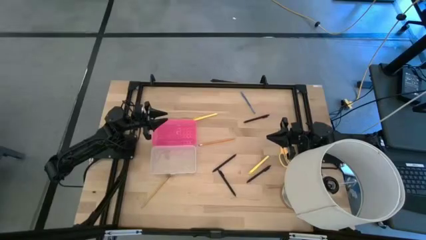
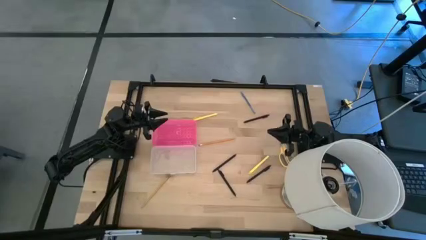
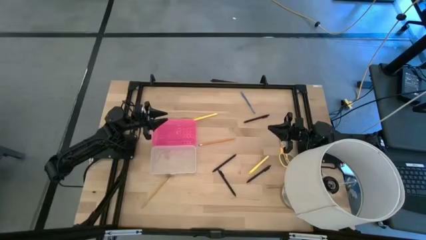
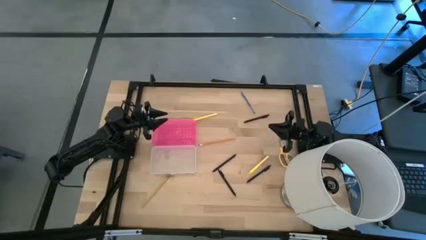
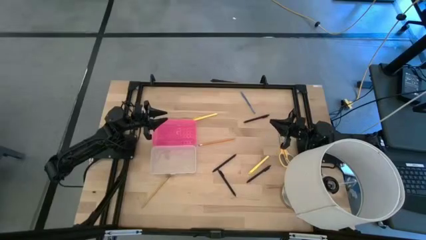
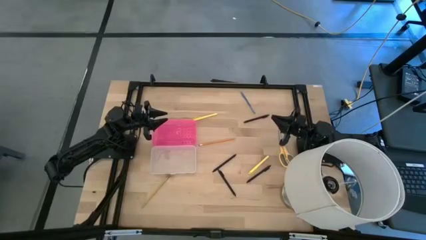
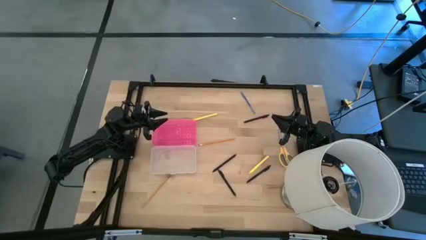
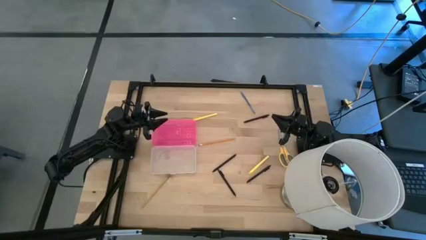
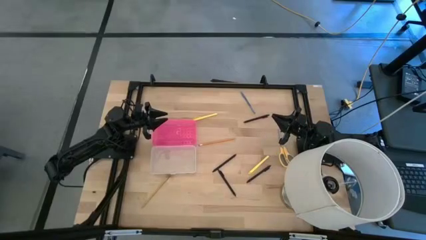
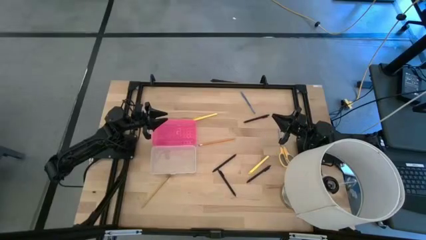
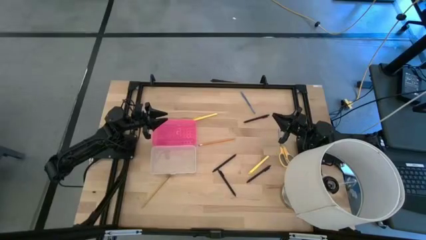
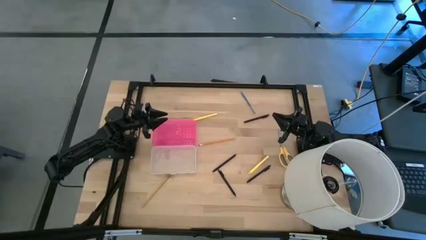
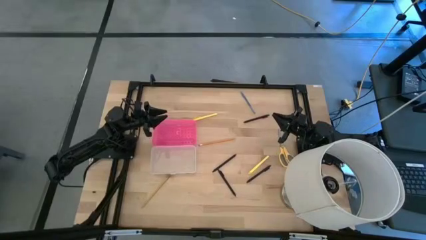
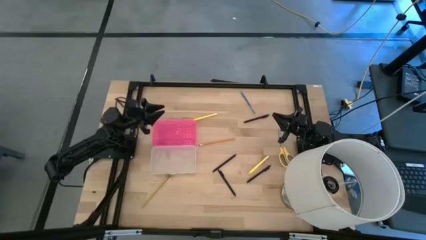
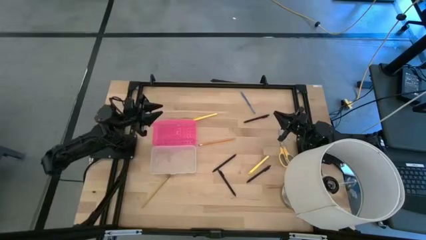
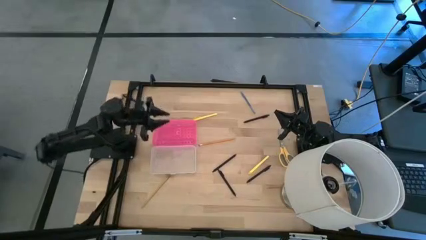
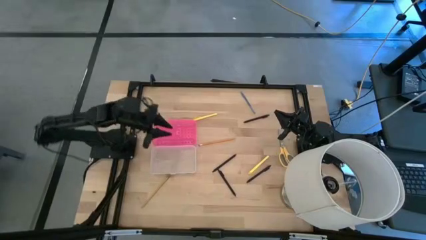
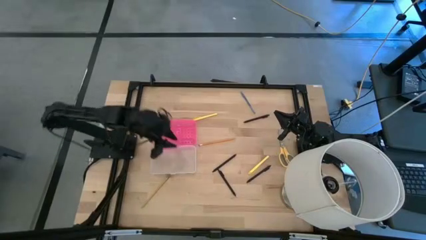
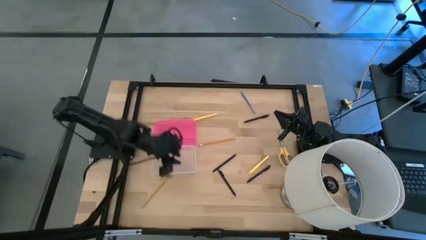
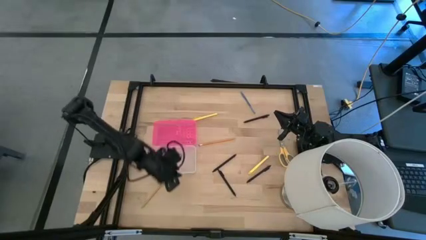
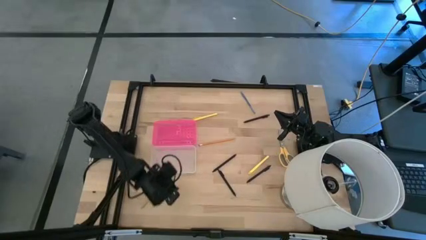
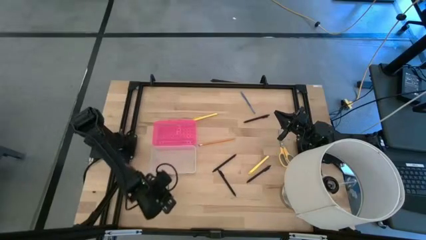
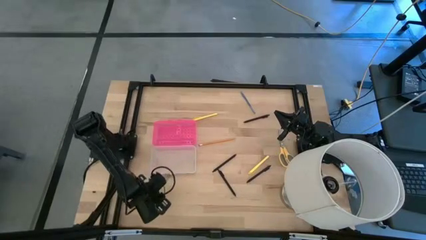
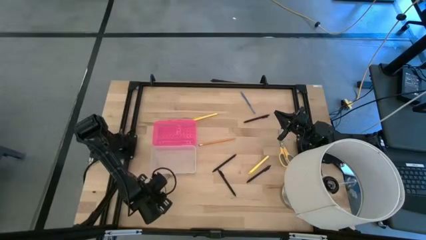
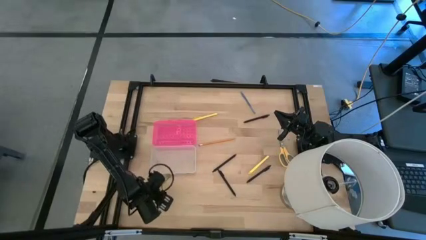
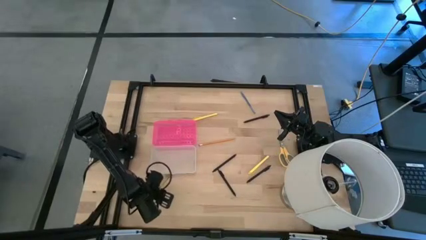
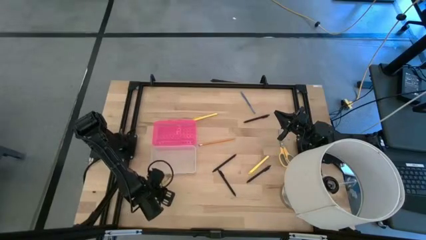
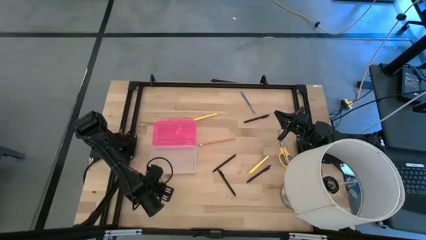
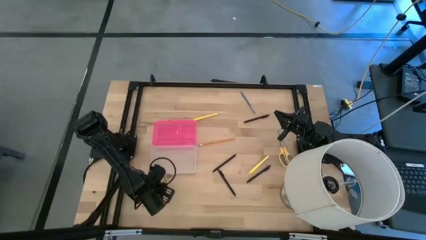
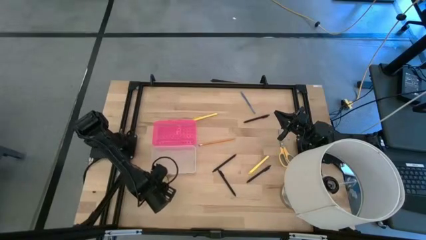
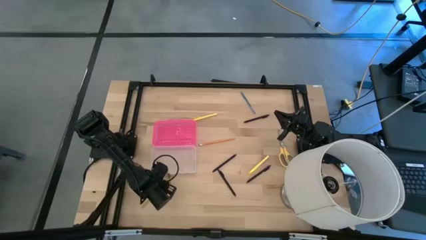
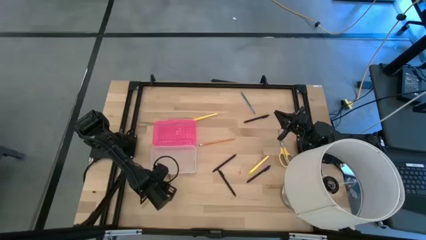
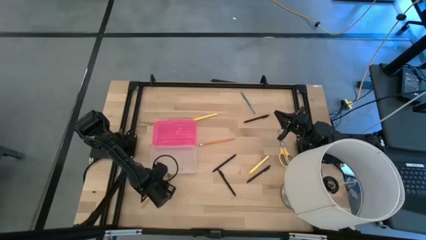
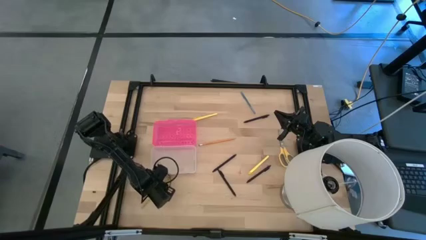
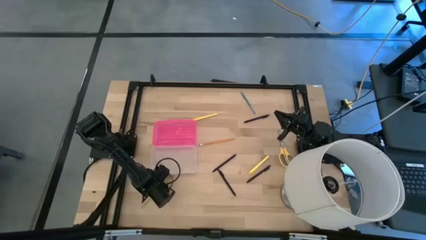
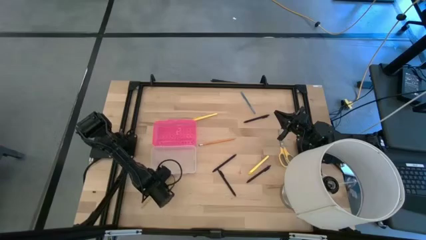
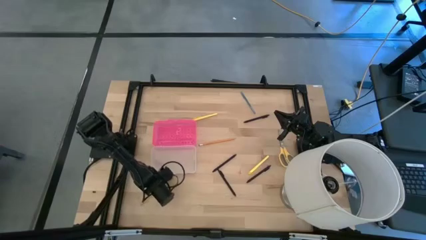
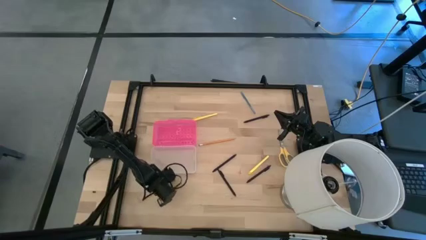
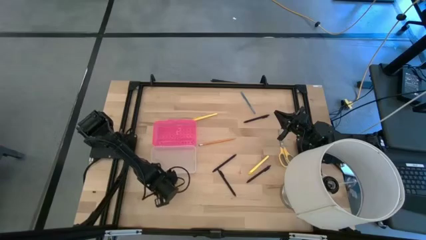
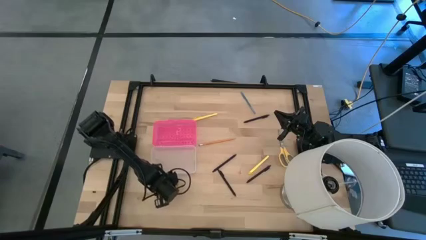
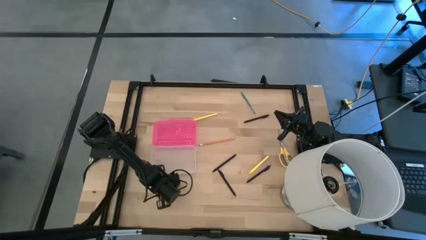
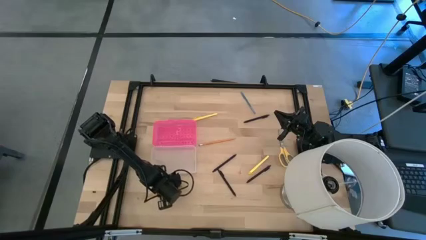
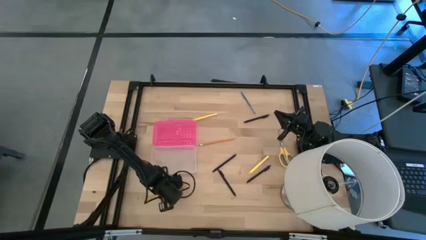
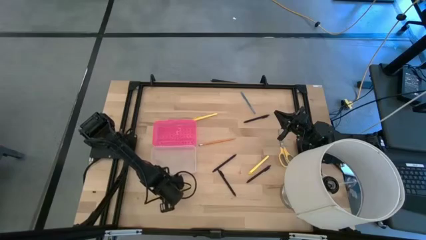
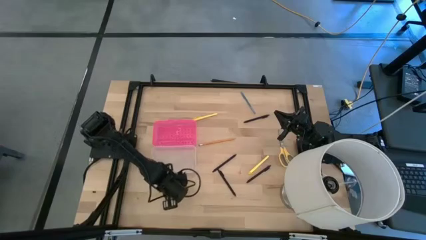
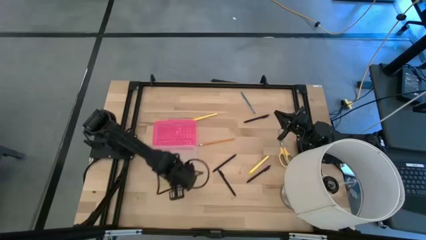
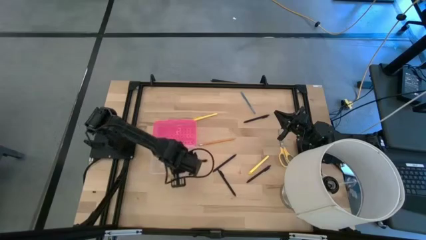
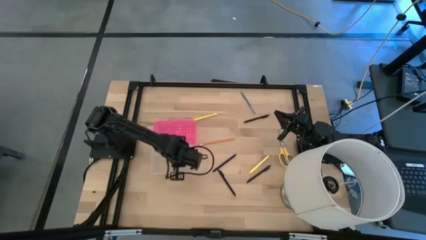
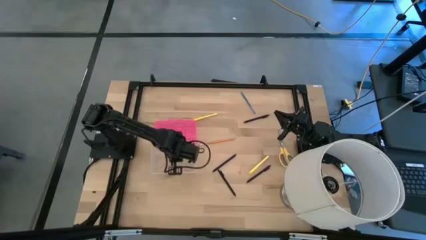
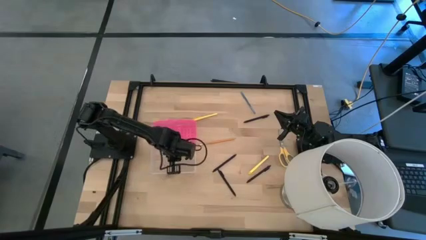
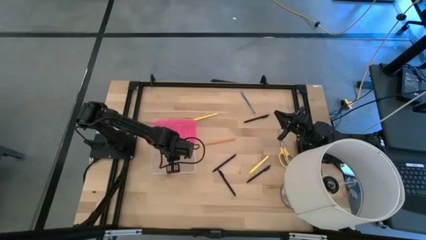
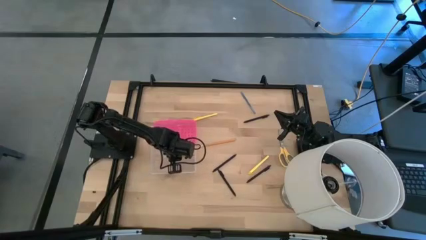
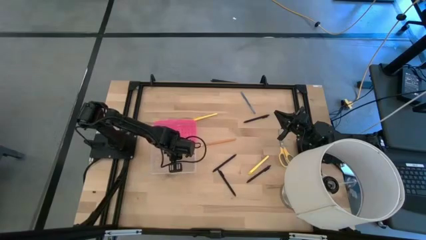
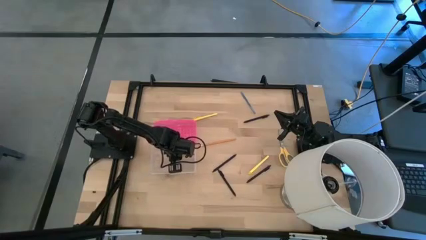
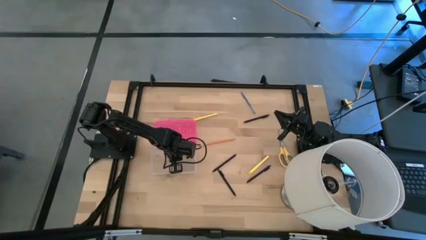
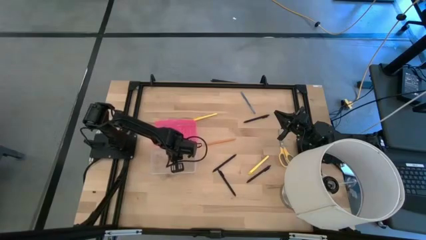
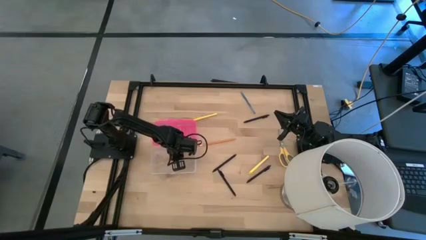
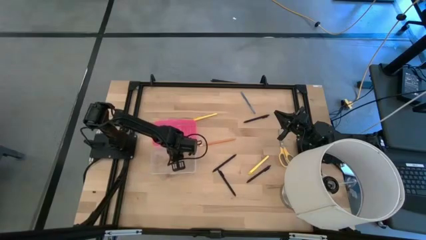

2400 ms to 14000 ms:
Task: Pick & place school supplies into a supply box
Put the bottom left yellow pencil into the pink supply box

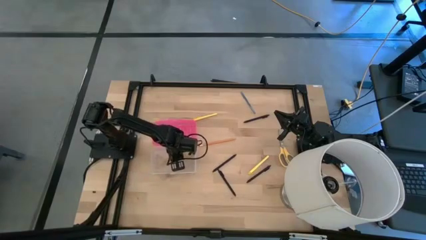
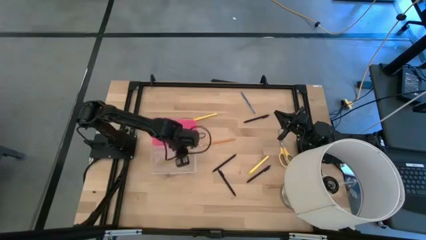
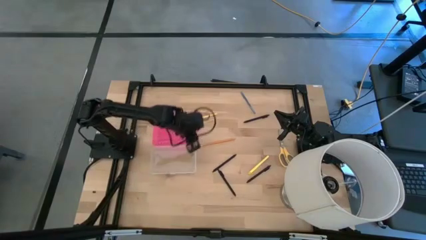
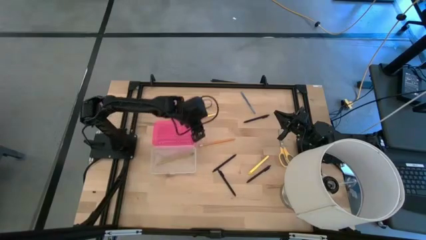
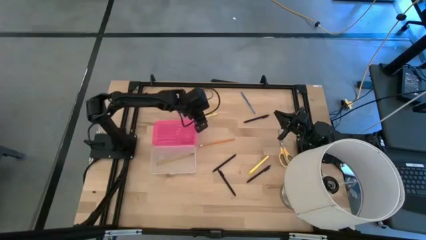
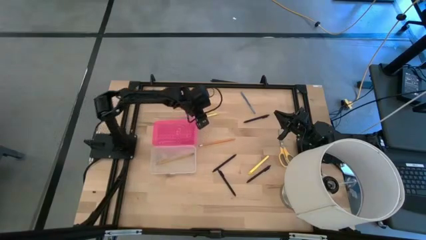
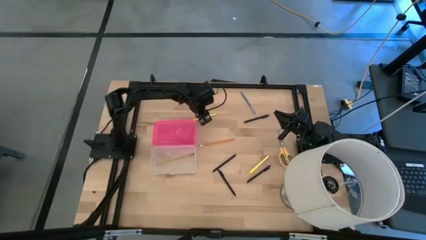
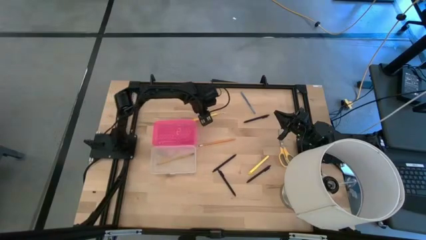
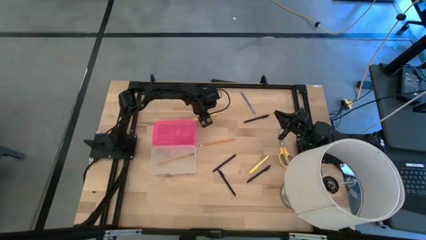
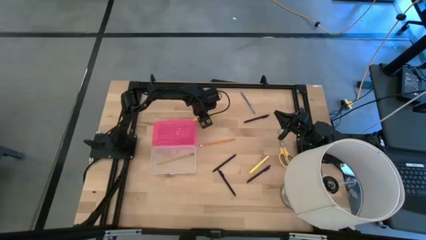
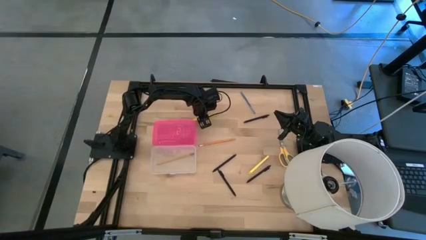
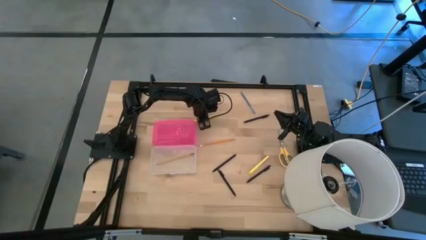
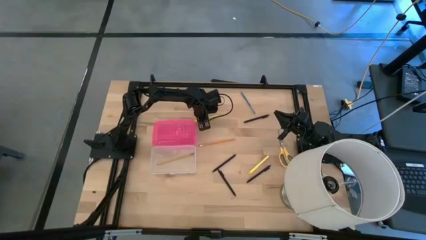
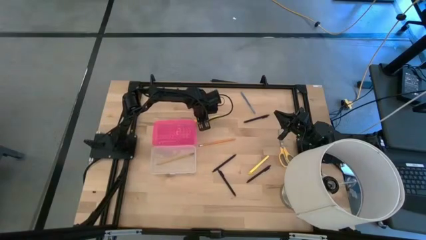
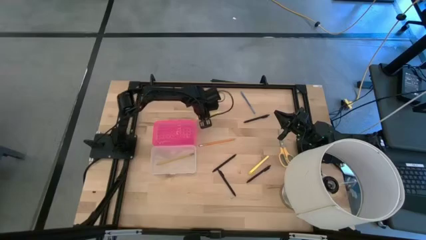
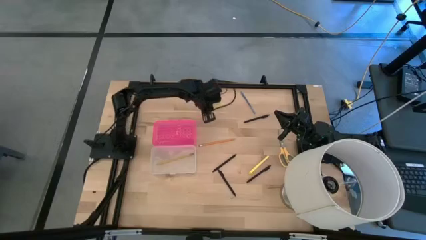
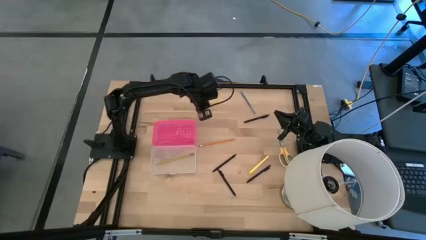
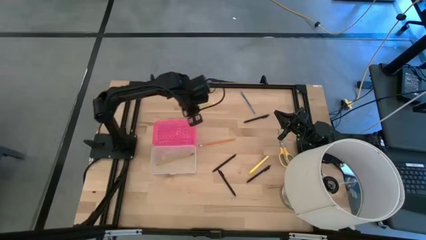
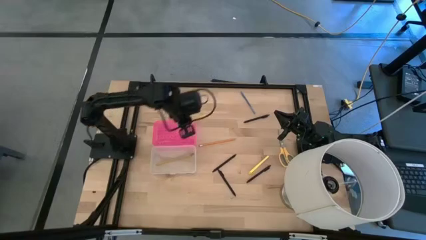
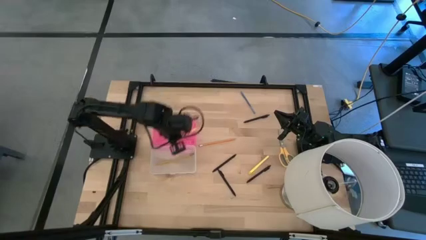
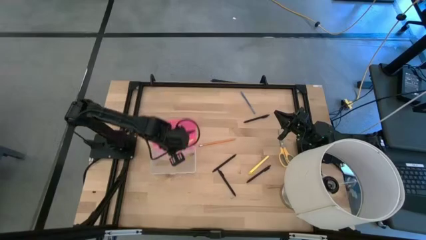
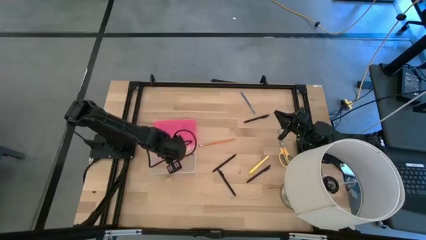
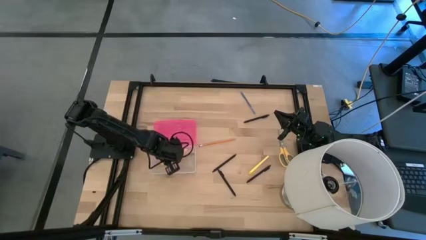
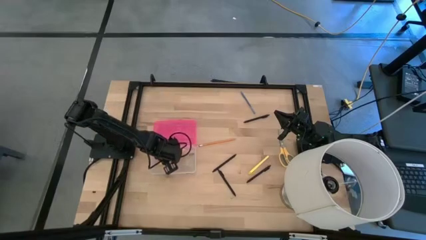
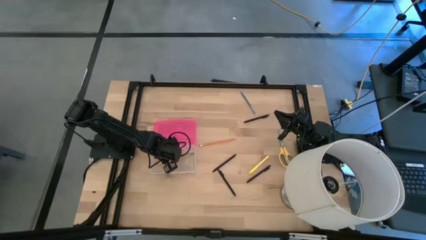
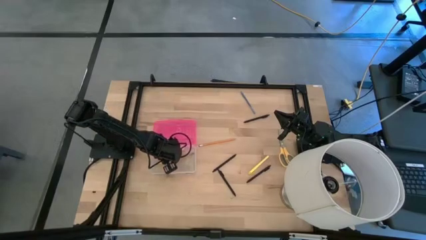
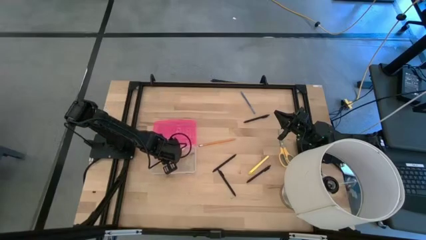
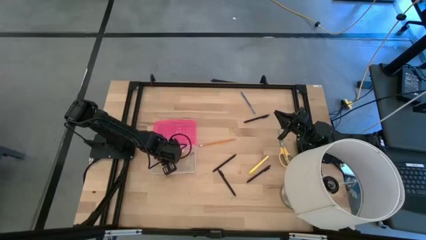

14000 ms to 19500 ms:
Put the top yellow pen into the pink supply box
